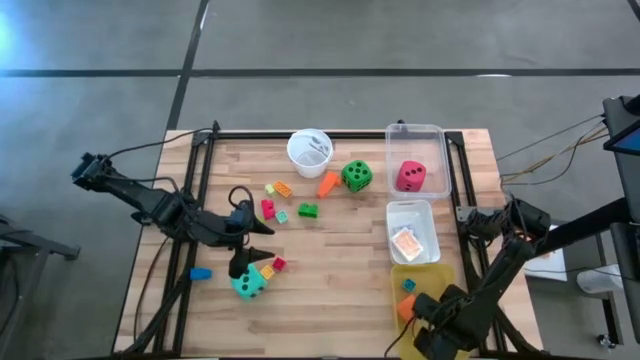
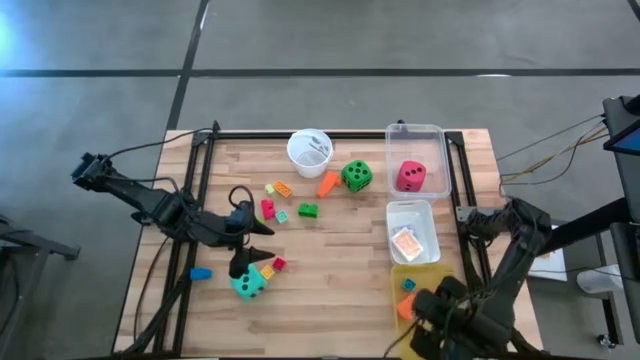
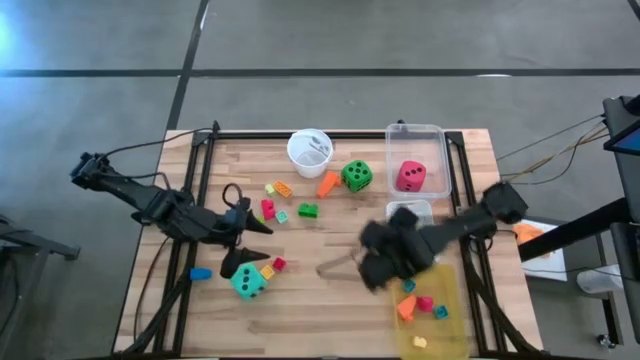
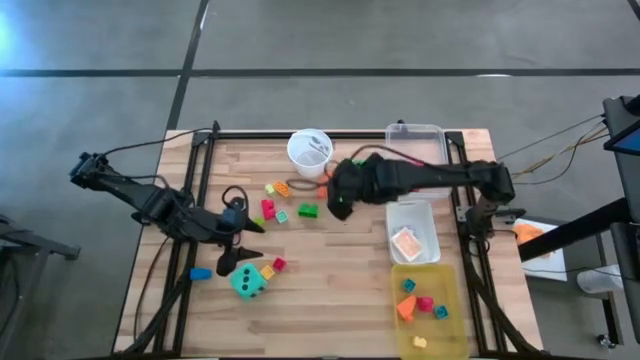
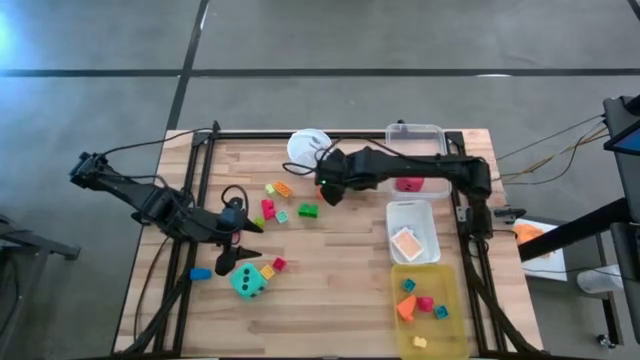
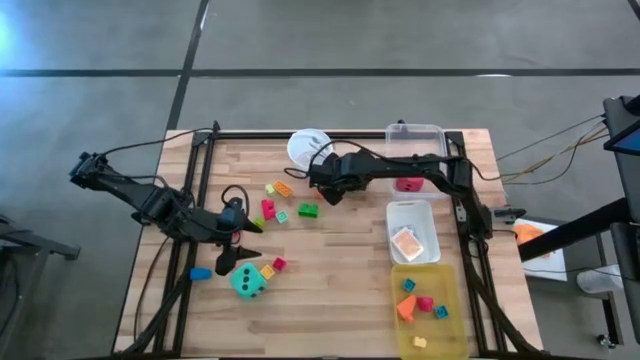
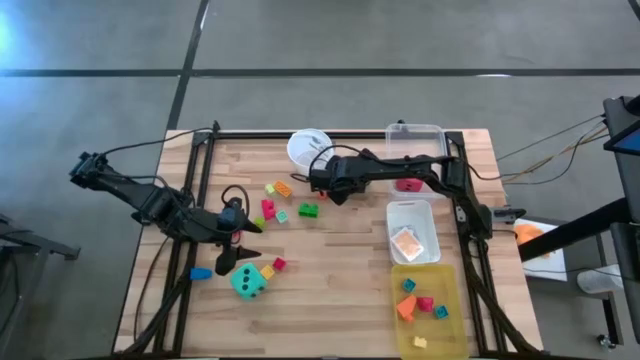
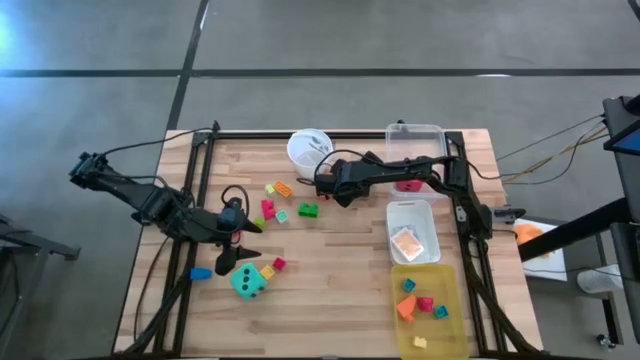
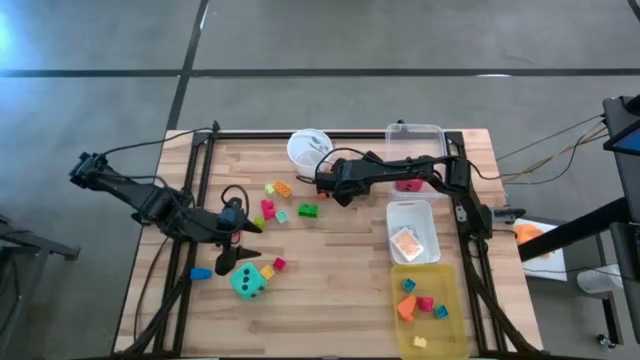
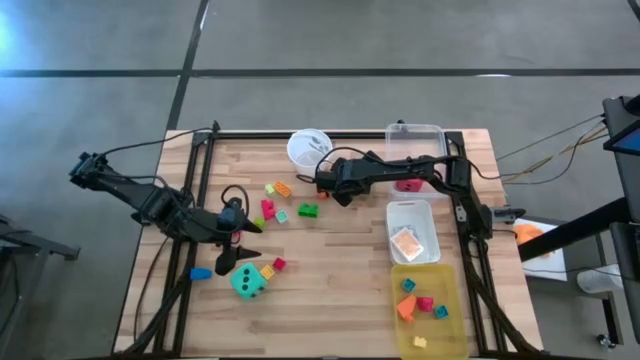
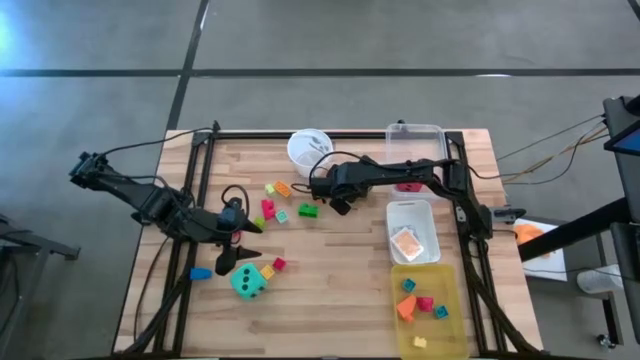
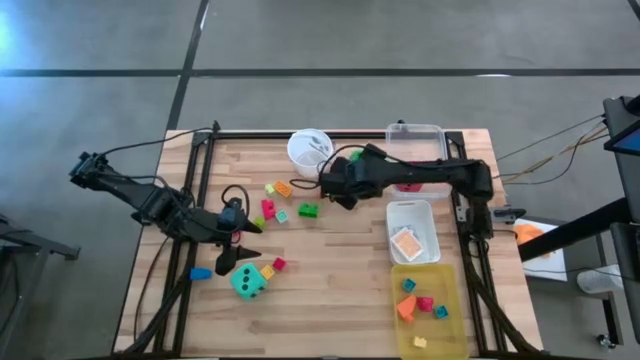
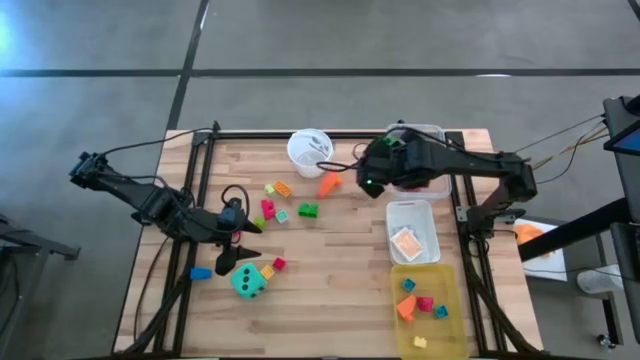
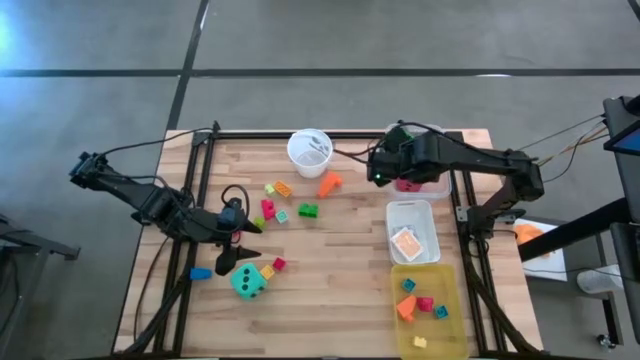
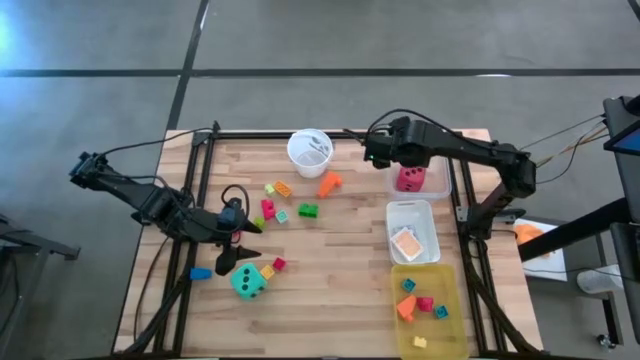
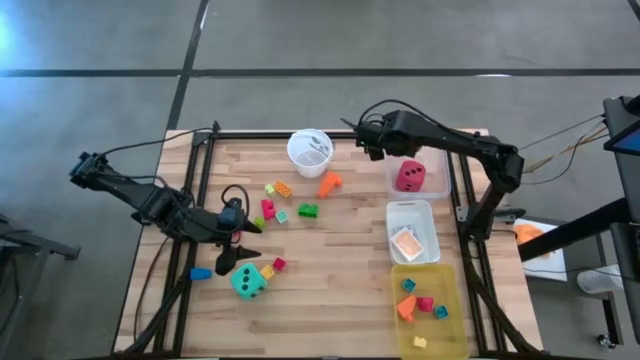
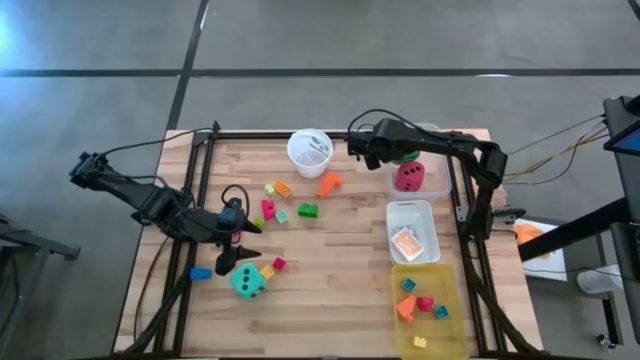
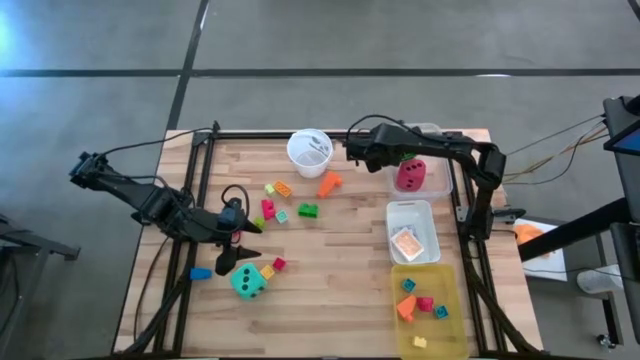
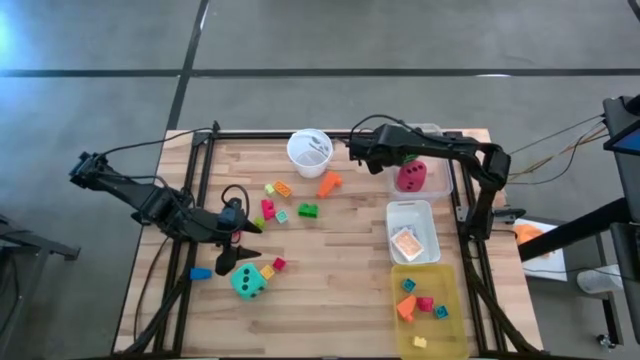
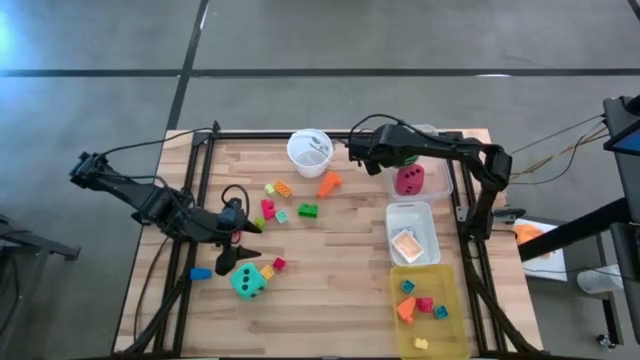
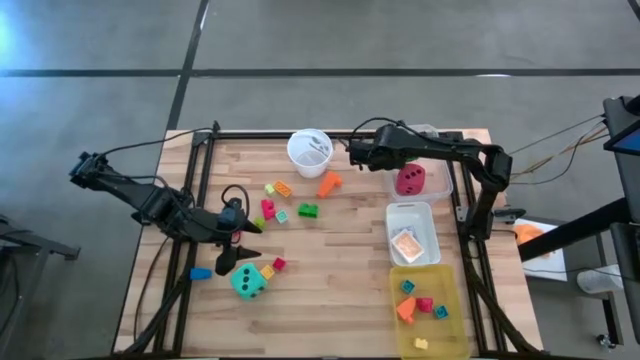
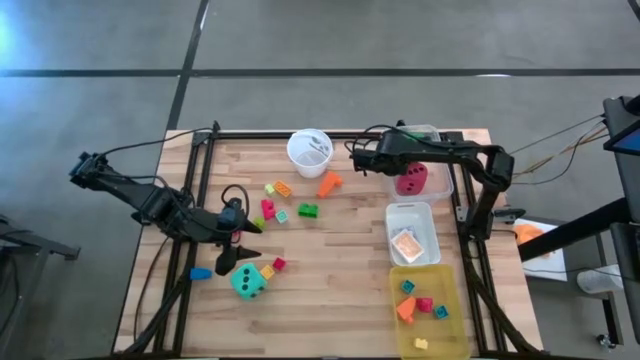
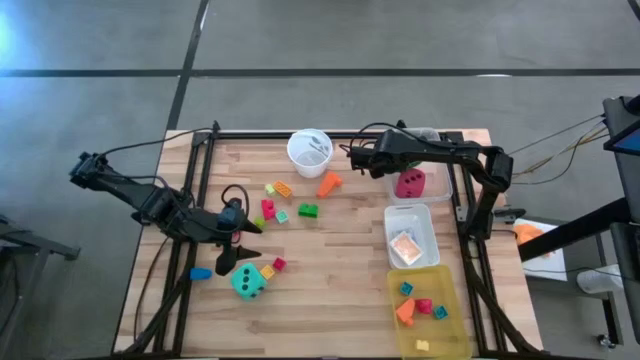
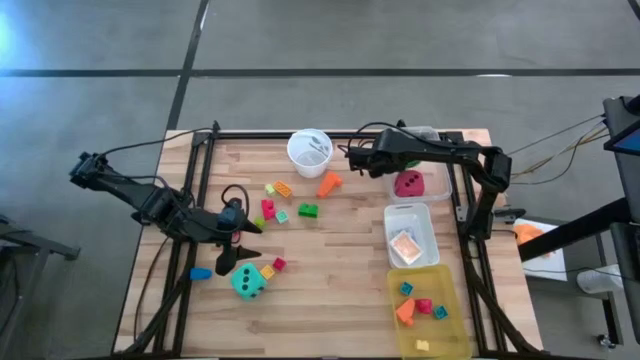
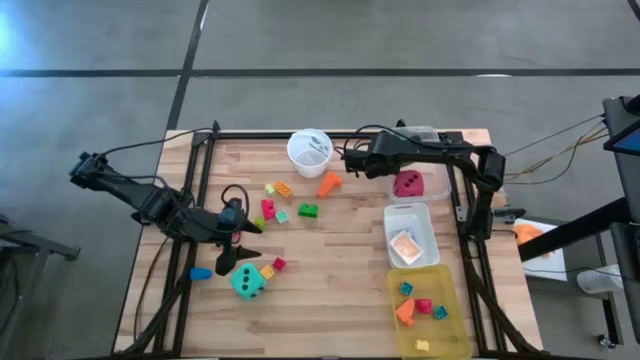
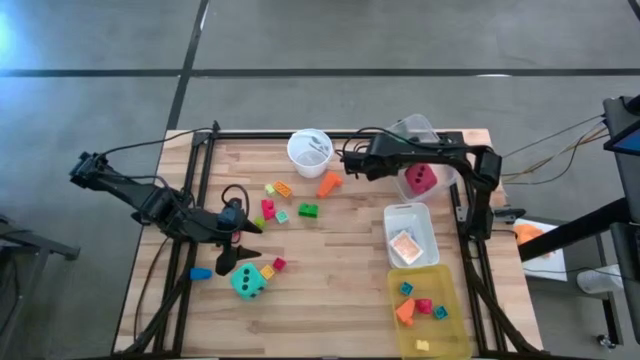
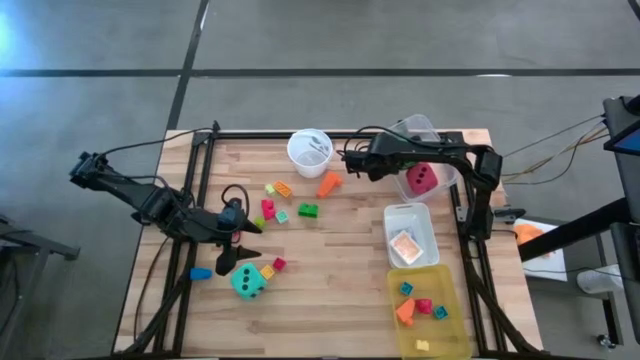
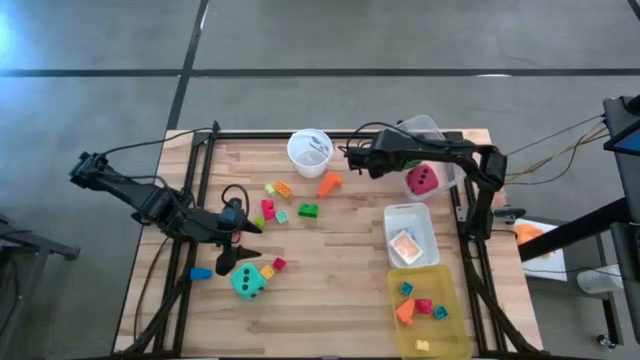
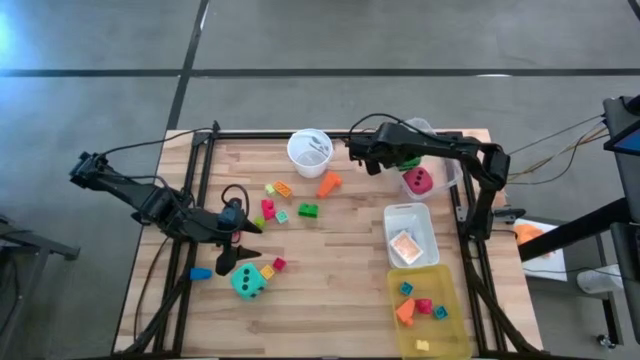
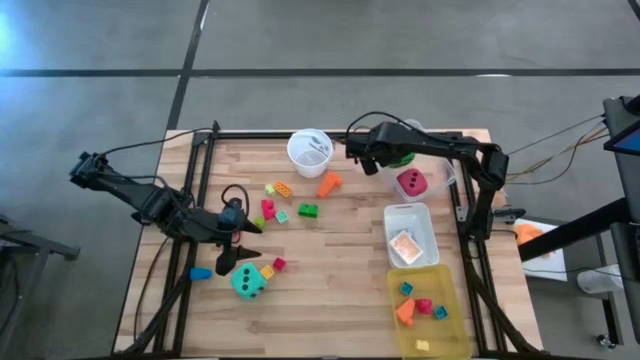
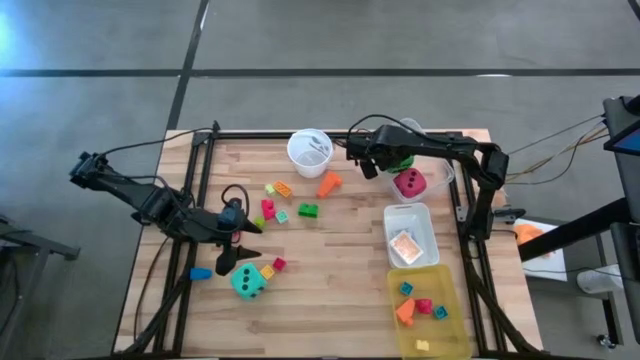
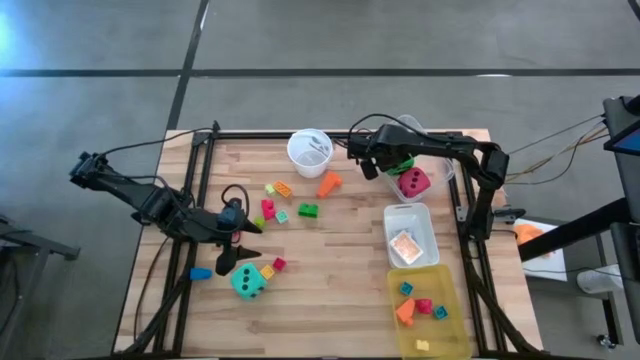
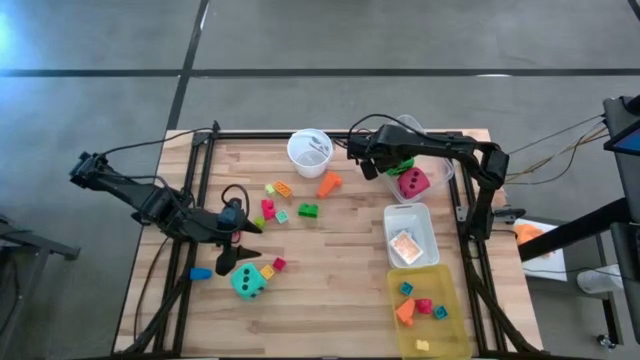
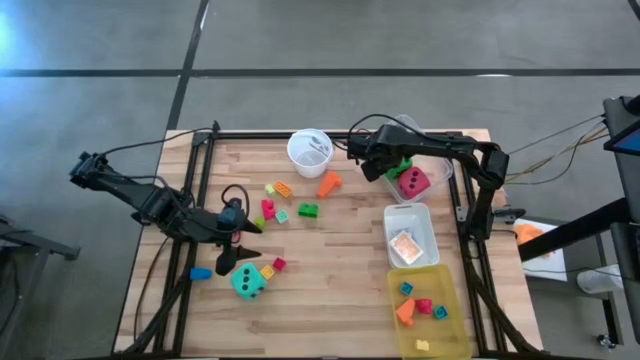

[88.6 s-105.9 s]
Task: Pick & Place Toys
Put the green dice into the transparent bin

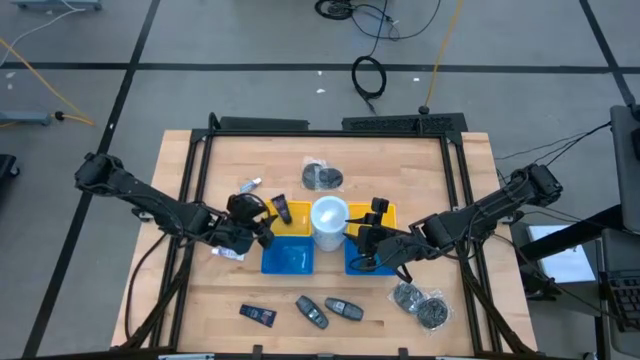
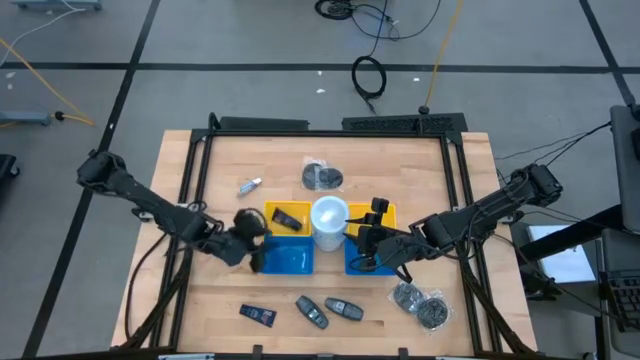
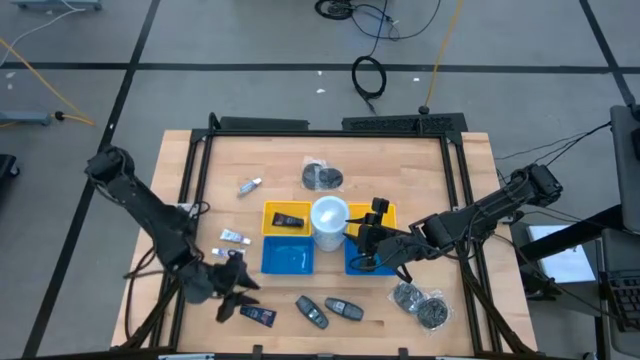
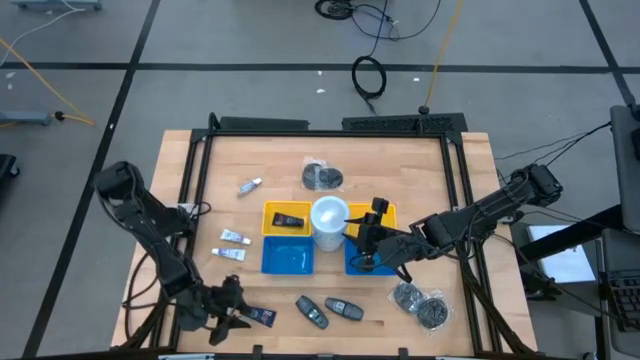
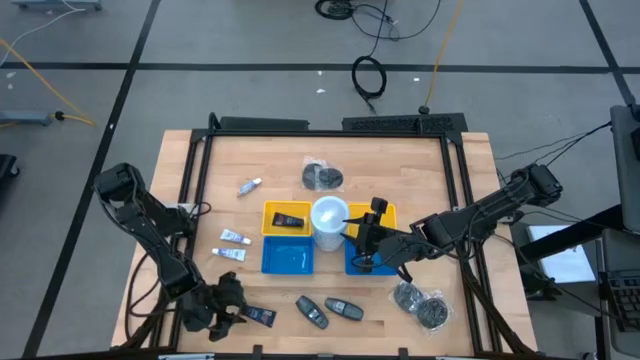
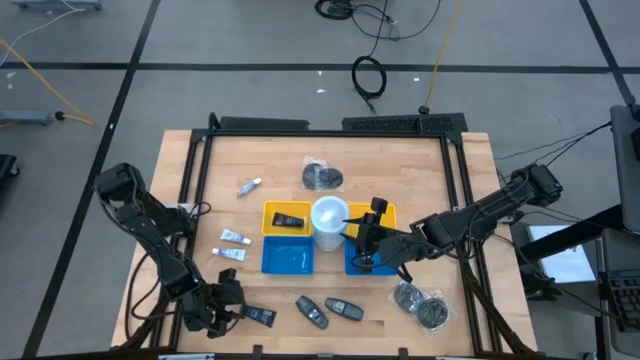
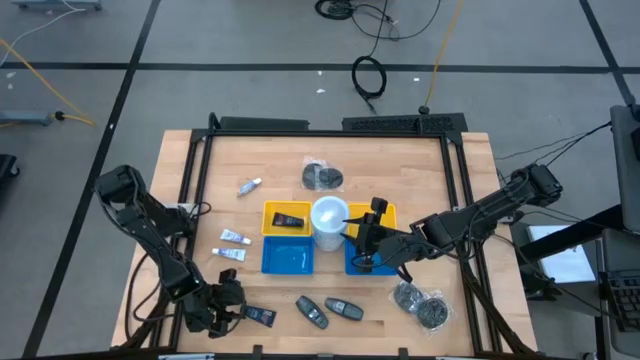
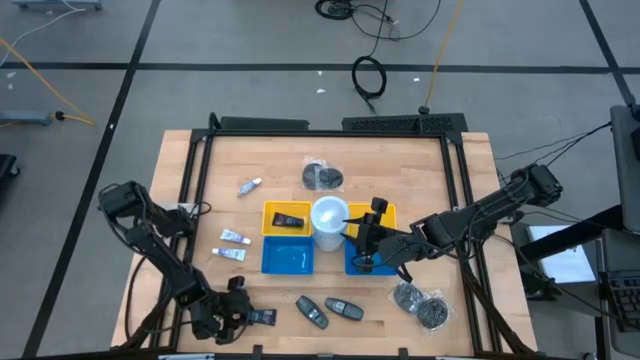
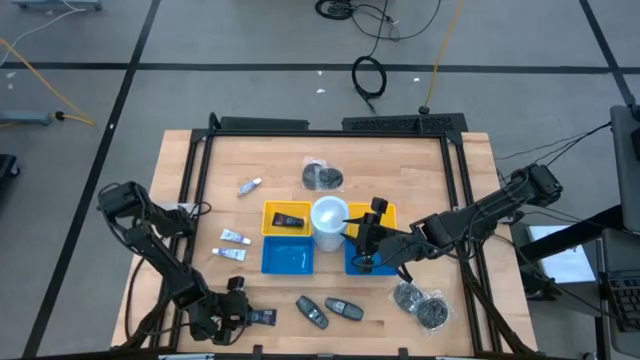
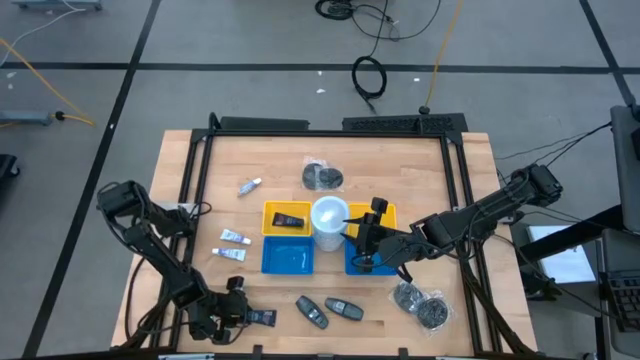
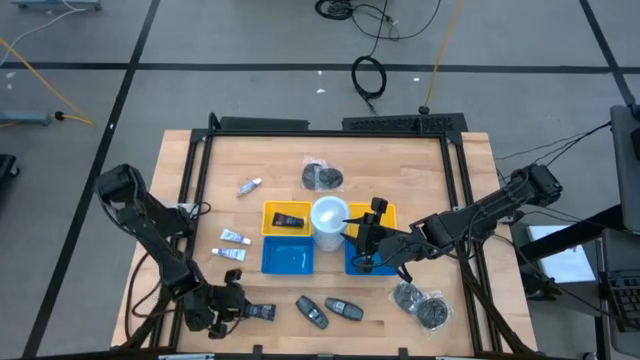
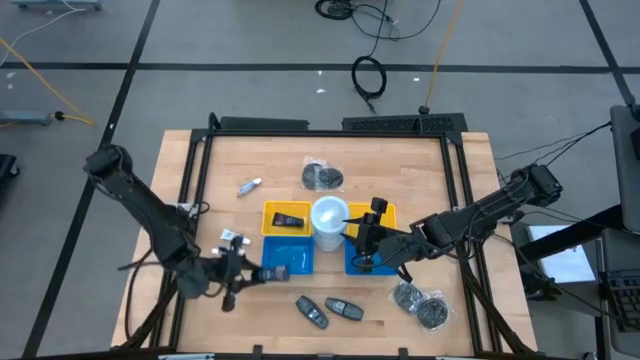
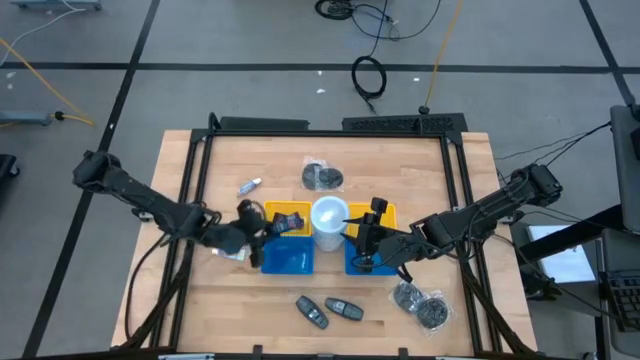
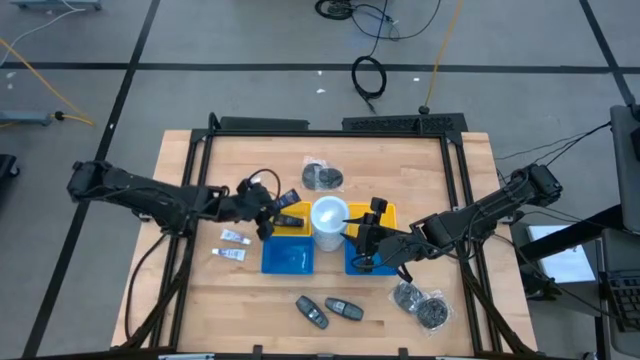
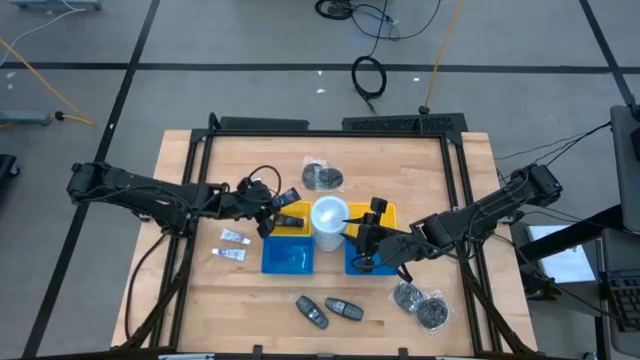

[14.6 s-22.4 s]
Task: Pick & Place Travel size toiletries
Put the shave cream into the left yellow bin
